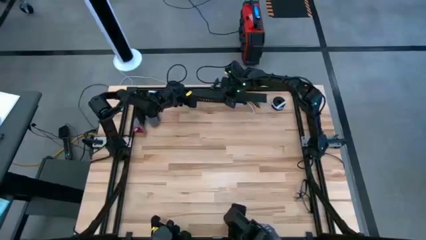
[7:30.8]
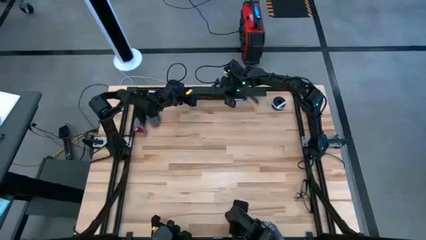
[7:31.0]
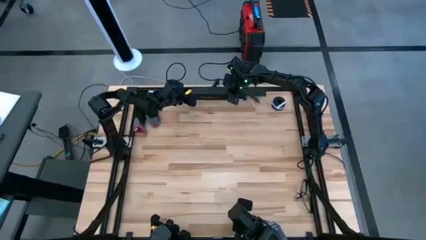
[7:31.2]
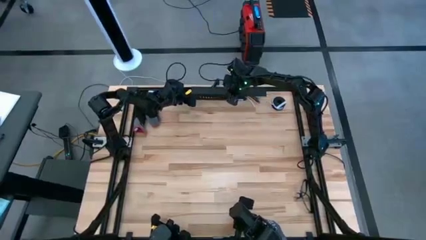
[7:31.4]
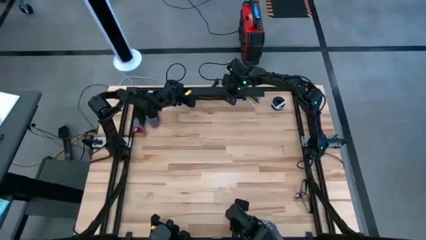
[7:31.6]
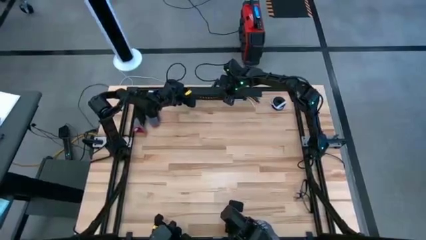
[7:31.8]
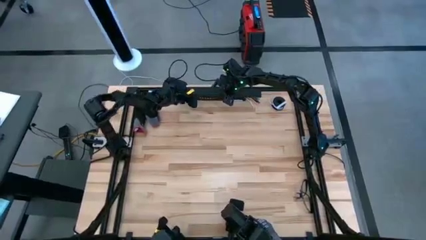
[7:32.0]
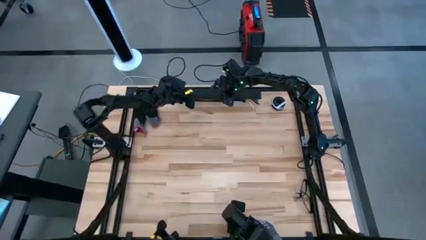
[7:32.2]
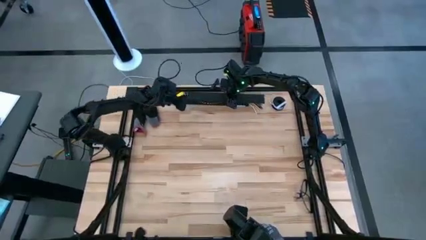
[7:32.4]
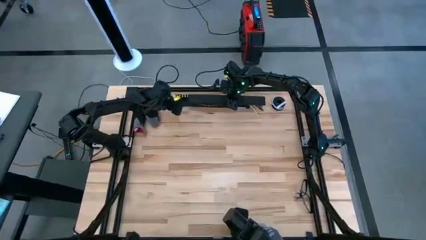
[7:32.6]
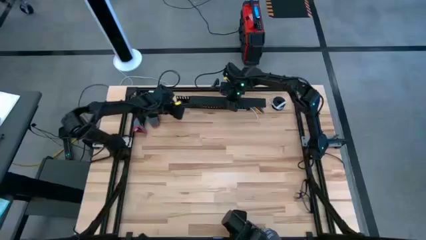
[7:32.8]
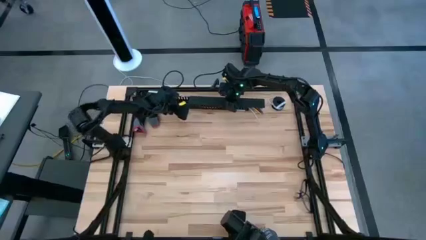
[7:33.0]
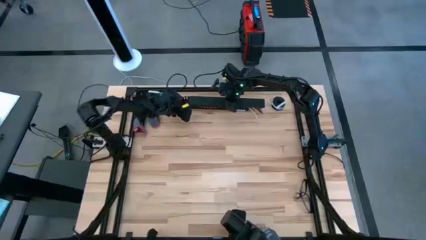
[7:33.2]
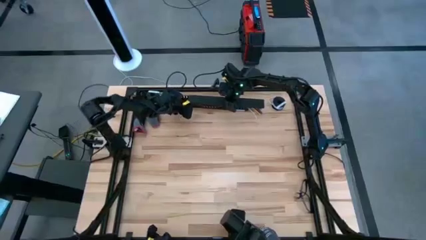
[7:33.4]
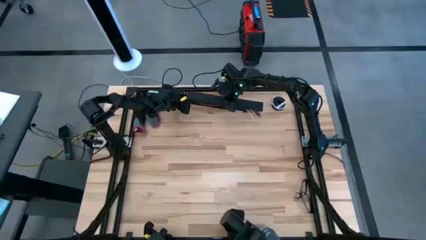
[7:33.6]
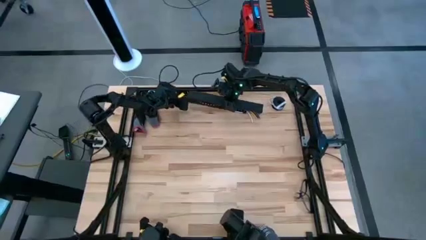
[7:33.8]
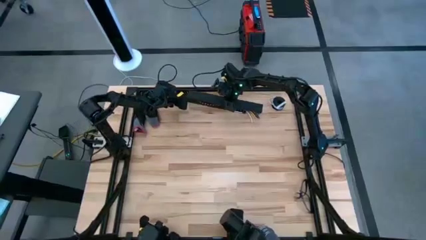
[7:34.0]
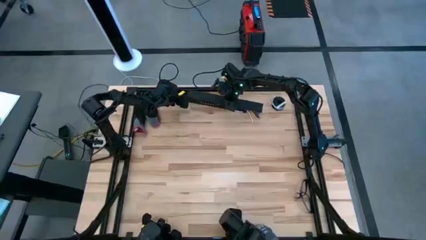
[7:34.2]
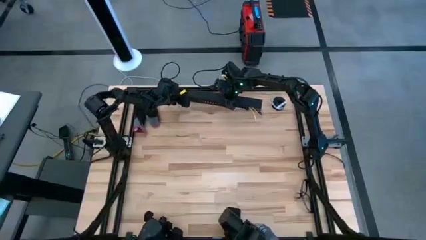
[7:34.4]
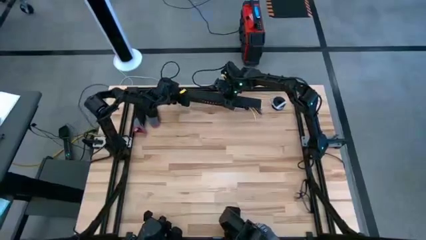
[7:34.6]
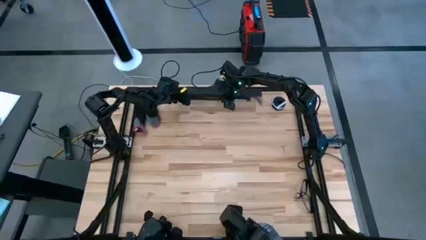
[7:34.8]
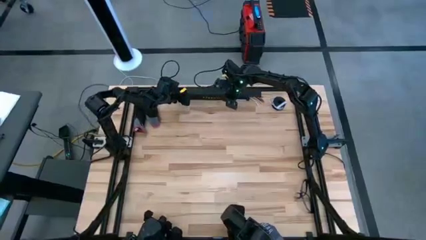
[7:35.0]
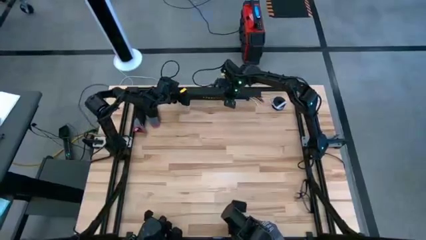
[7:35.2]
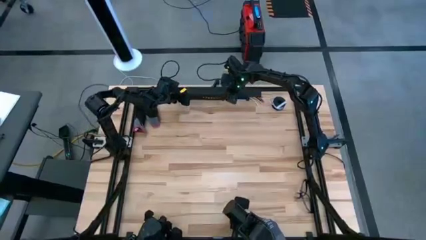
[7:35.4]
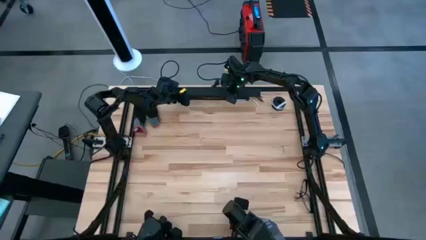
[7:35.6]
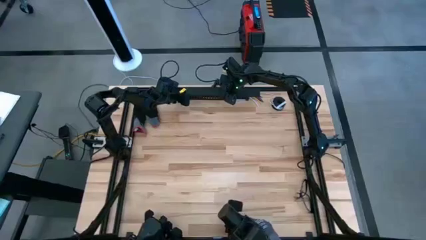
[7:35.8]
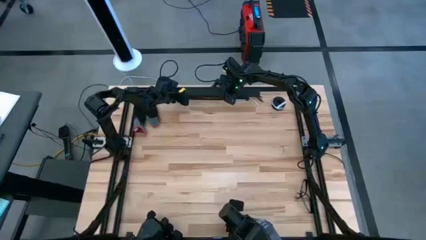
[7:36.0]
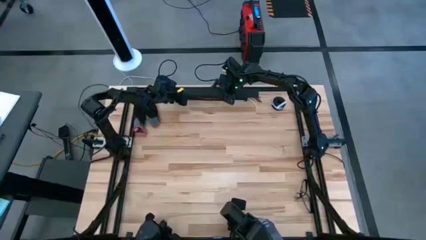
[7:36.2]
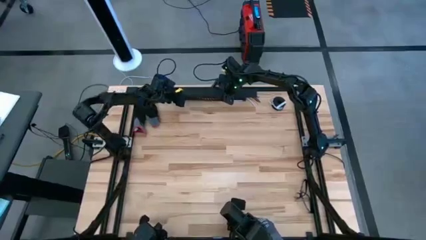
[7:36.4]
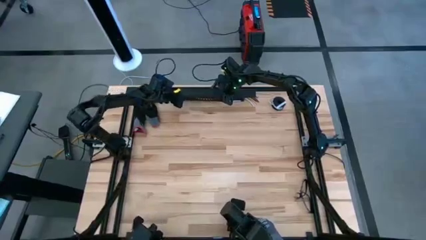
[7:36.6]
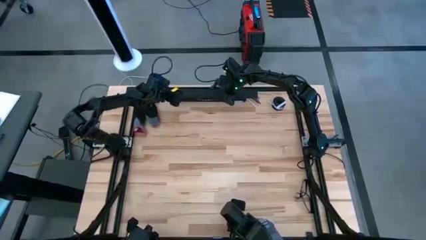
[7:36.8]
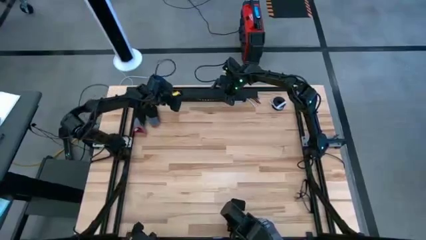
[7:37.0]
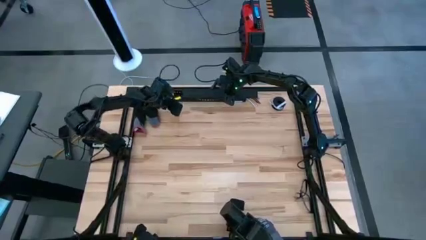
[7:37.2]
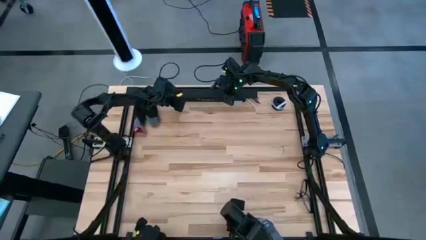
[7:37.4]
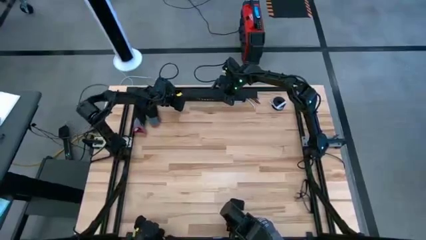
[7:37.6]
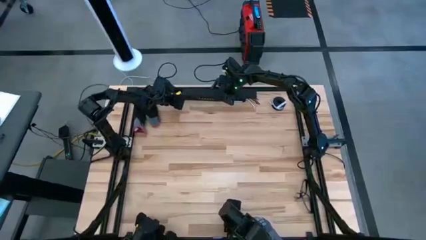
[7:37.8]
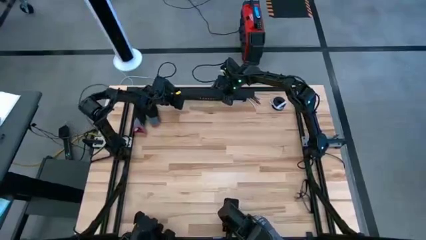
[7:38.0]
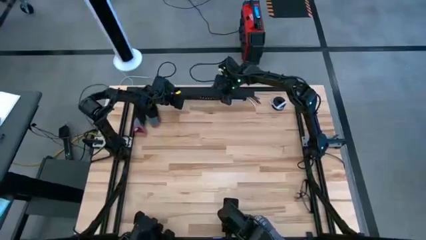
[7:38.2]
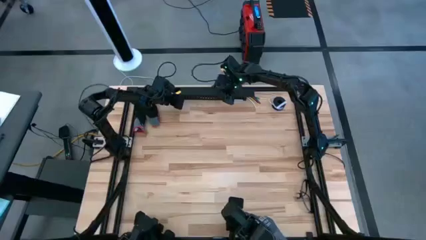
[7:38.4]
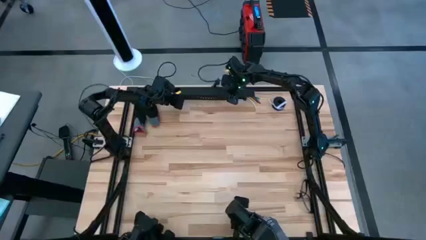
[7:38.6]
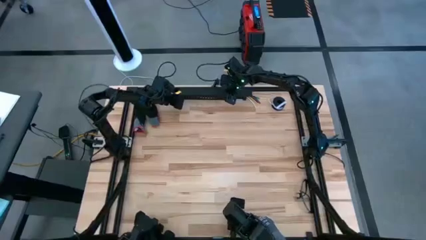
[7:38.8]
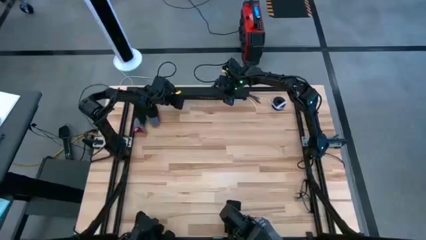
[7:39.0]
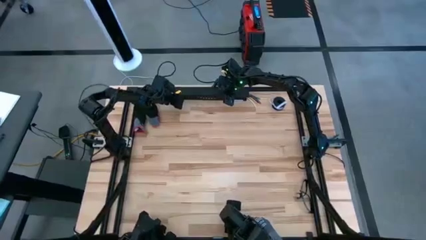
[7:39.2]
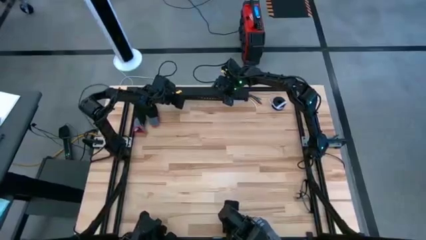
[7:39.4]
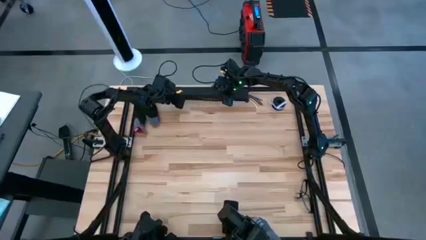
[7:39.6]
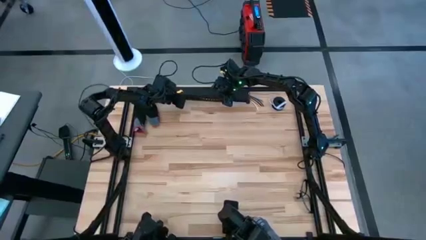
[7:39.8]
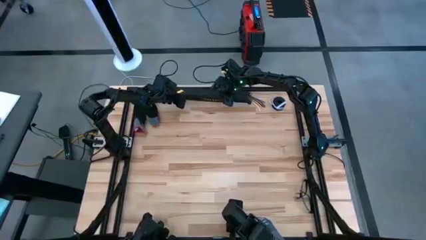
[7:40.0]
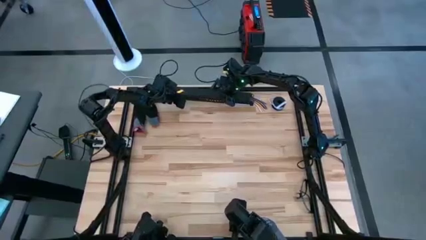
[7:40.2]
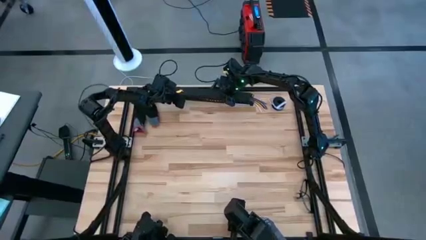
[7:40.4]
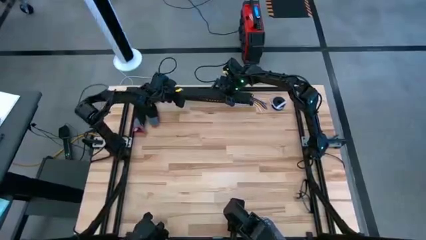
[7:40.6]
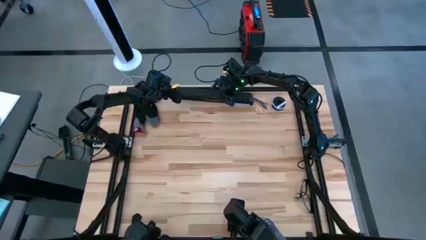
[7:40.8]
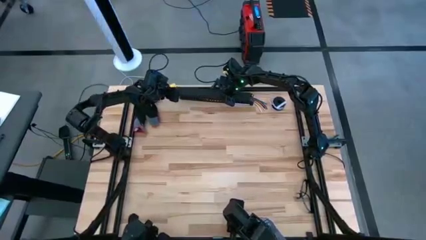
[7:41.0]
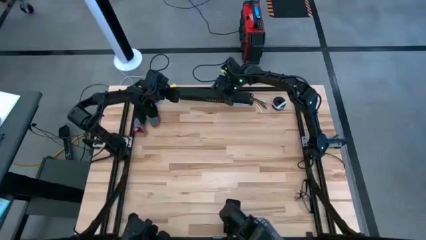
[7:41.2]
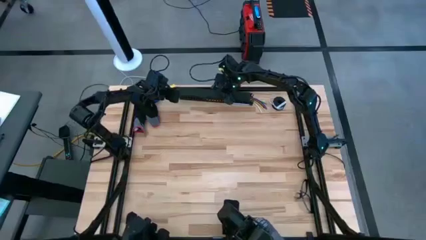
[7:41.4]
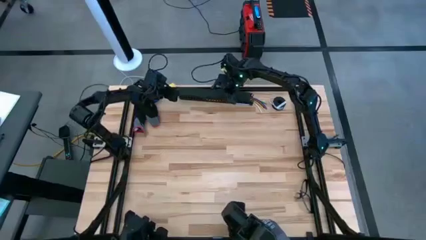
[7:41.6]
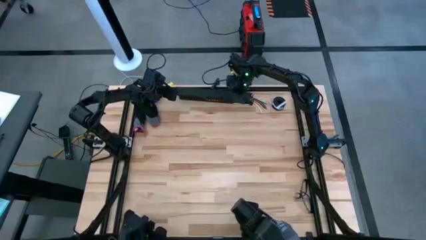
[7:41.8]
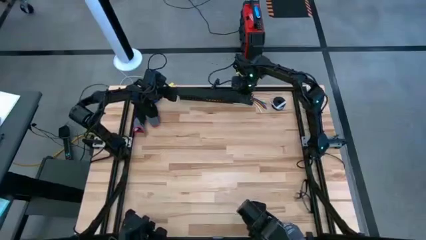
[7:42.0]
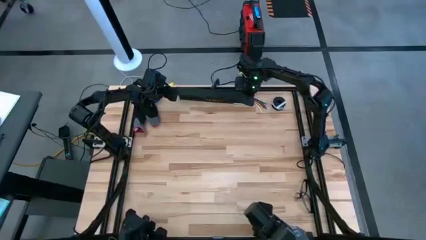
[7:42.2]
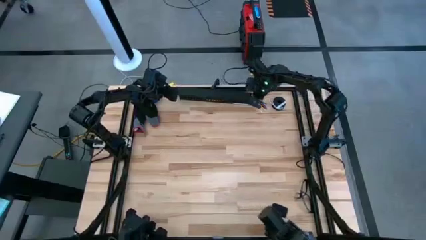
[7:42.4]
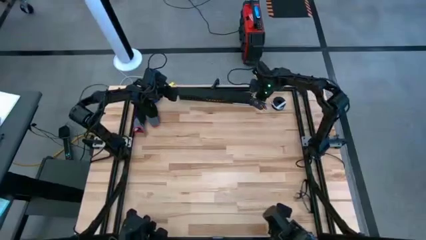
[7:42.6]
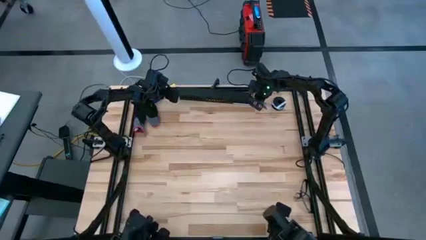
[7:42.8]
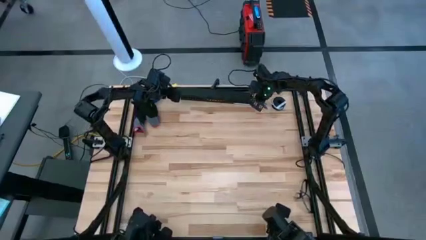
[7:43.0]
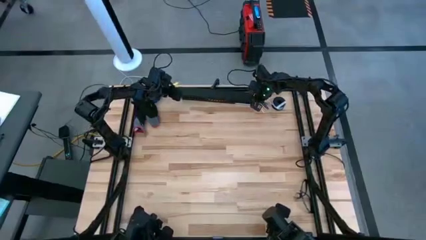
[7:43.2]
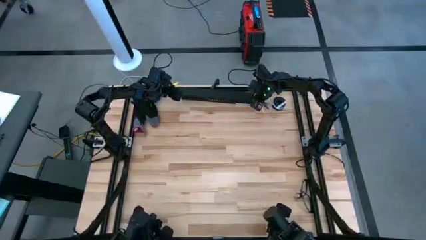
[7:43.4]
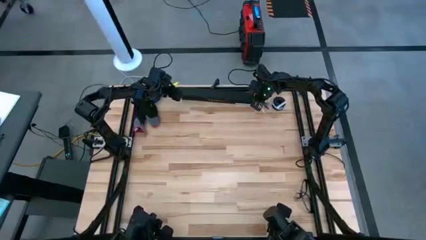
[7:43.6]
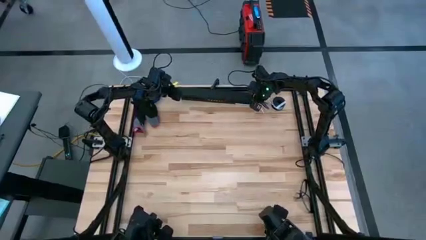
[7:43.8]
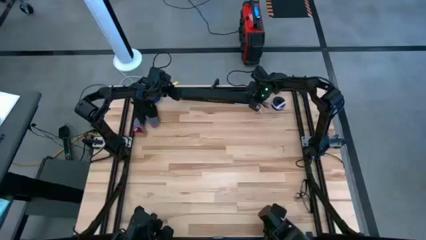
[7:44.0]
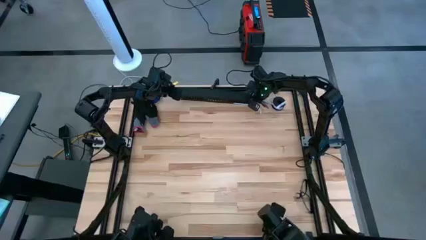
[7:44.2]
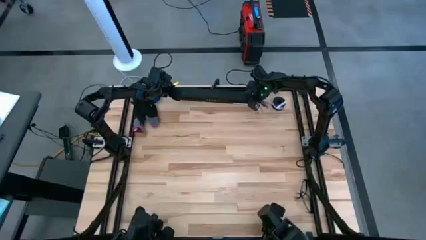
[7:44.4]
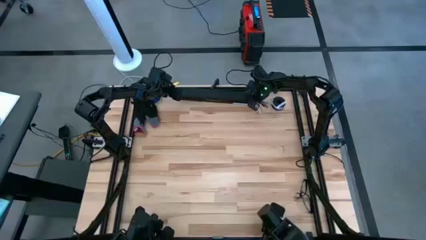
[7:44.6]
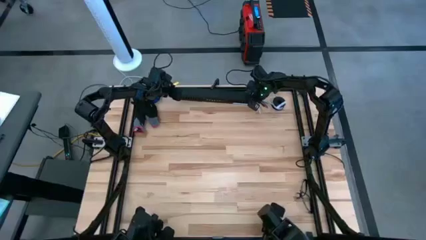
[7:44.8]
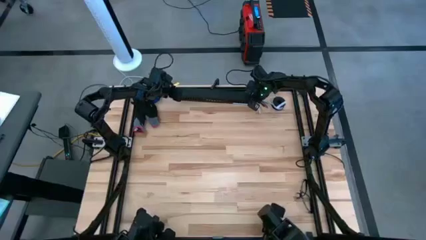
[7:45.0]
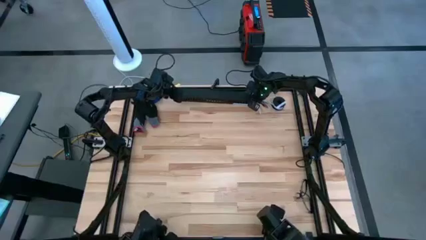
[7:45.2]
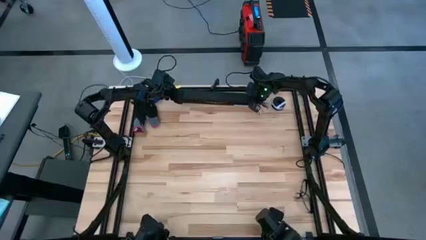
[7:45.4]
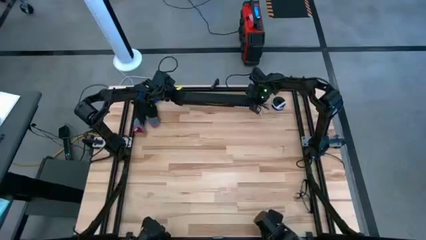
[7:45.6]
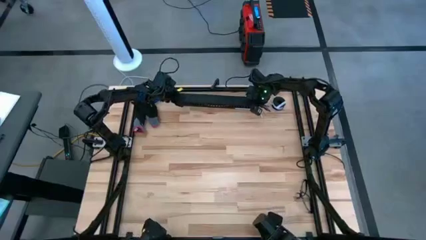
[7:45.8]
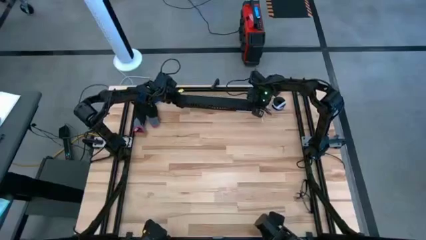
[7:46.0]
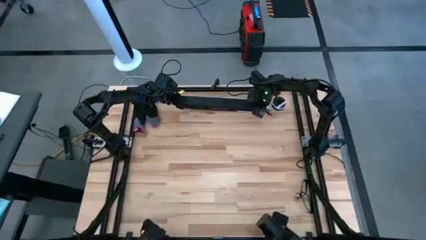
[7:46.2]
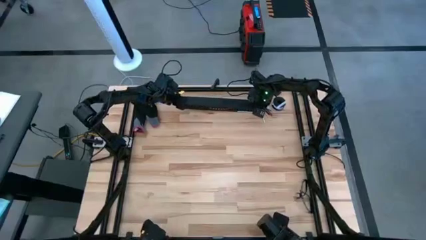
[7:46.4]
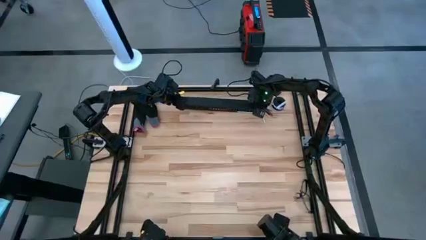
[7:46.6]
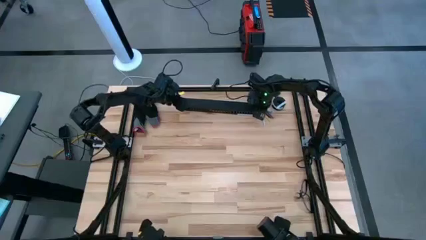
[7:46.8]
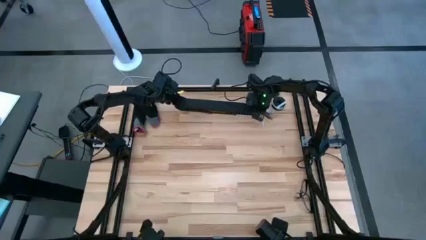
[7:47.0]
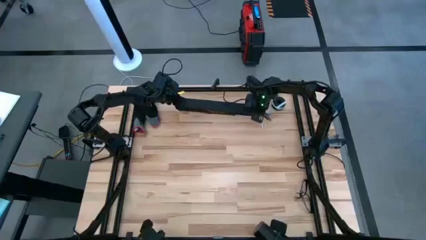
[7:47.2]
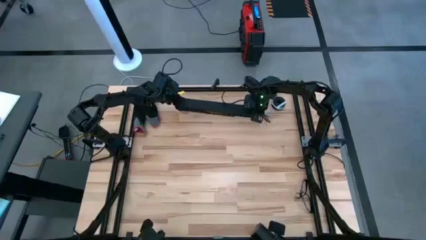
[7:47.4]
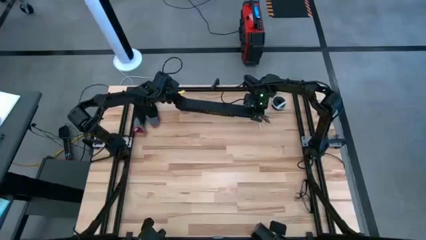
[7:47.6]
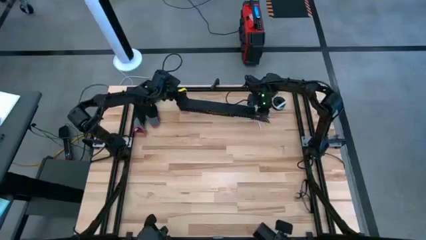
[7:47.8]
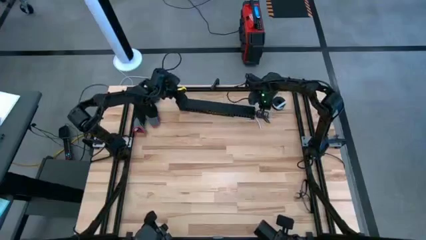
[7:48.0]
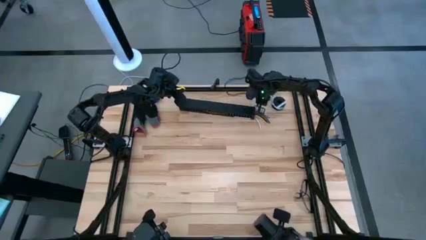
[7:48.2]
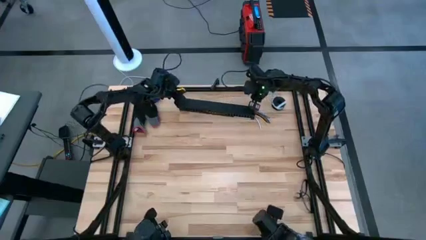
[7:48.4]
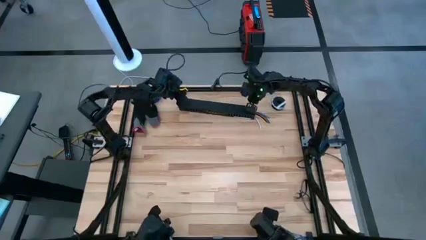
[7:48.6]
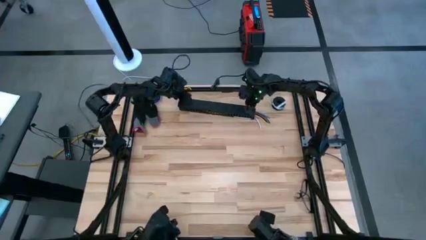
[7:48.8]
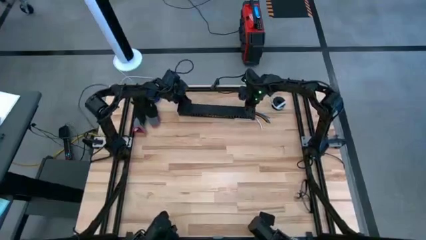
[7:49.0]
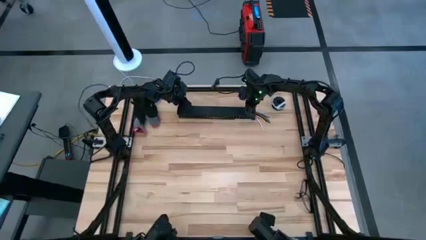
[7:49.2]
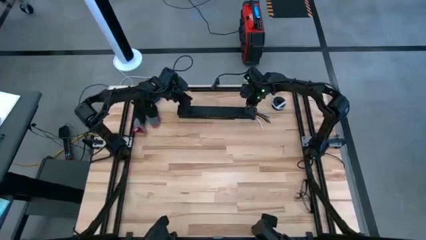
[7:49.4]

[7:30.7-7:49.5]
Task: Ziptie cables
Close the black cable duct
